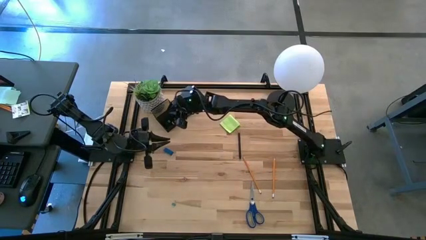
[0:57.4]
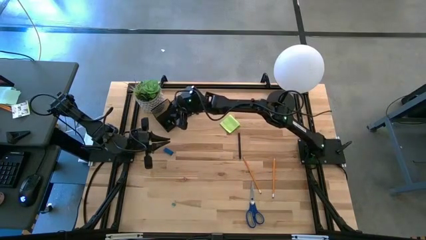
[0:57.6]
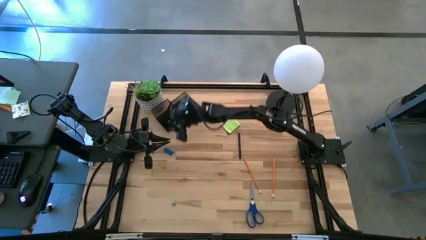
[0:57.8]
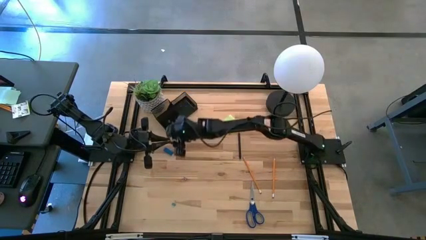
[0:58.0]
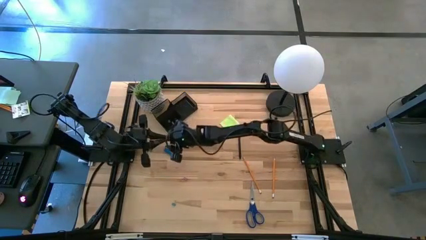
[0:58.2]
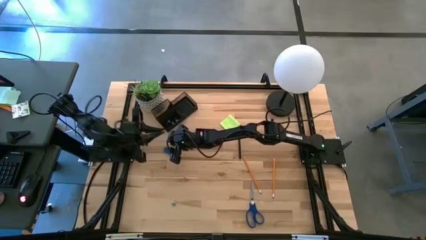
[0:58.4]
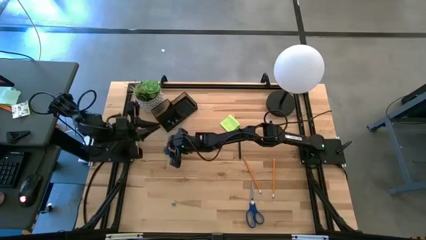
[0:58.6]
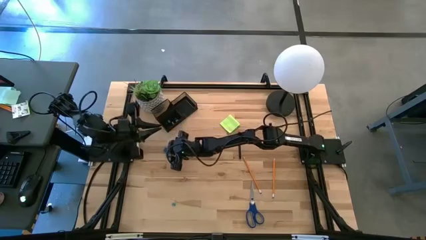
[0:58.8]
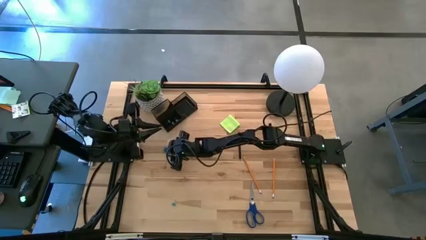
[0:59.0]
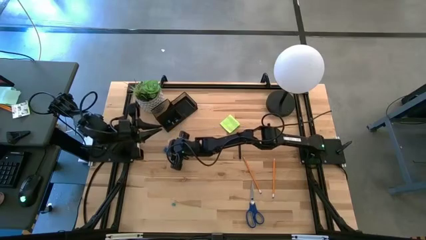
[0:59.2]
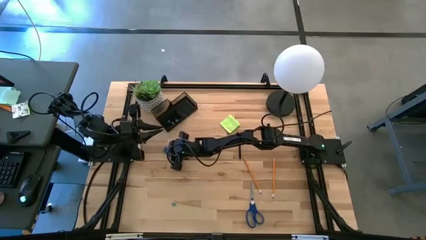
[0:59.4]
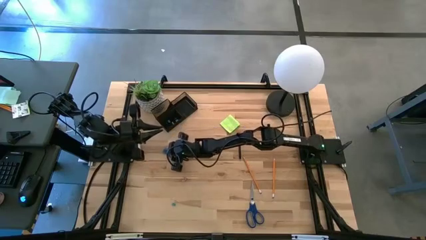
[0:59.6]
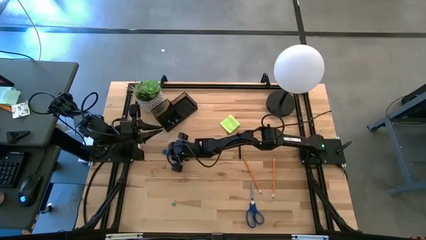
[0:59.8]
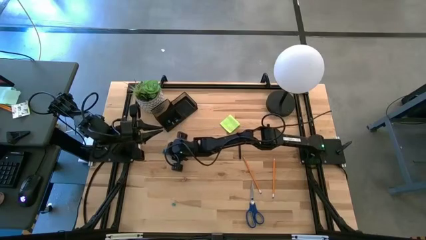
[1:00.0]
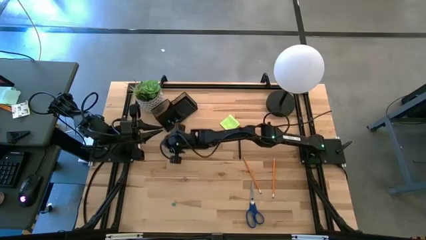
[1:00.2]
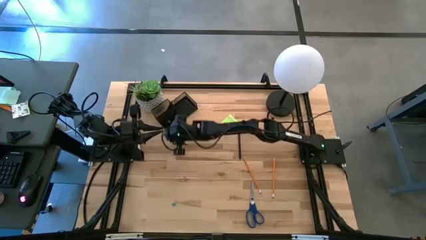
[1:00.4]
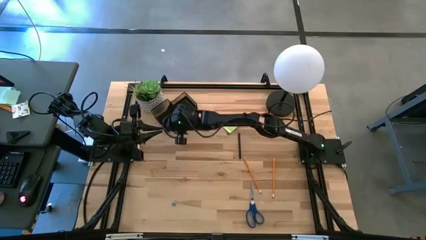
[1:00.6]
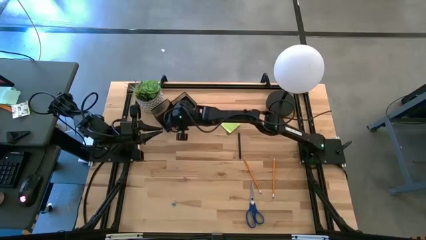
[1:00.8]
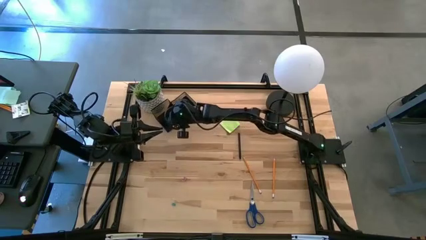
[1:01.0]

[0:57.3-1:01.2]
Task: Pick and place office supplies into organizer
Put the blue eraser into the desk organizer

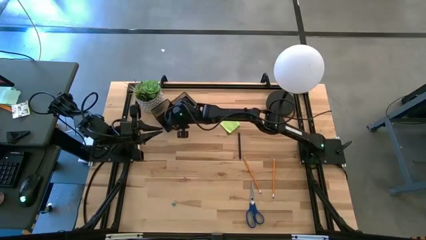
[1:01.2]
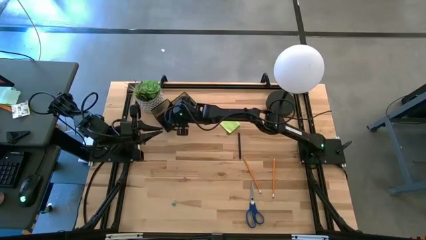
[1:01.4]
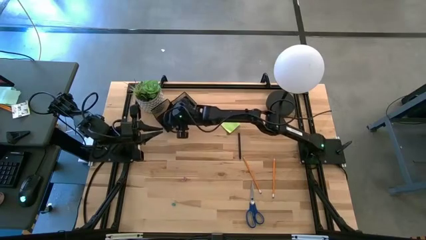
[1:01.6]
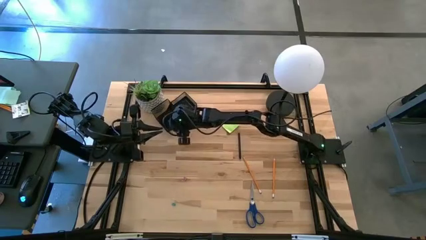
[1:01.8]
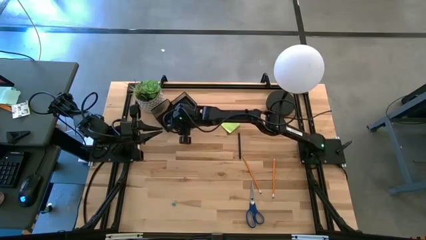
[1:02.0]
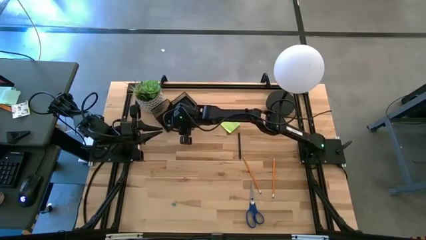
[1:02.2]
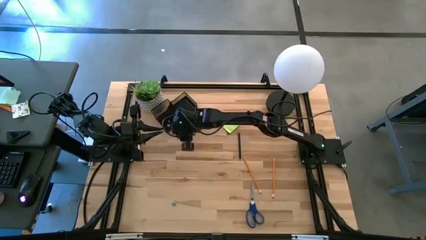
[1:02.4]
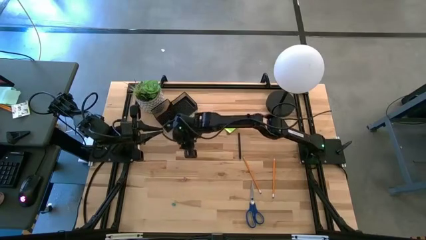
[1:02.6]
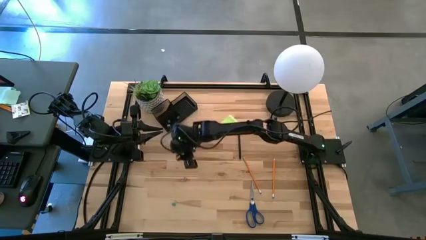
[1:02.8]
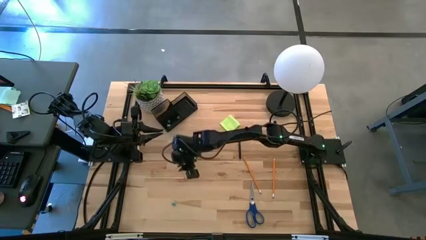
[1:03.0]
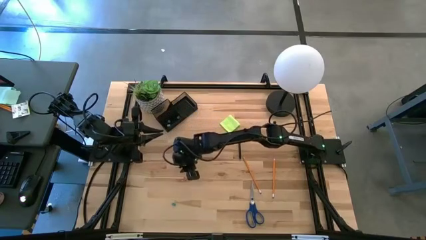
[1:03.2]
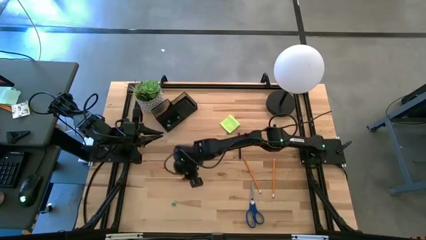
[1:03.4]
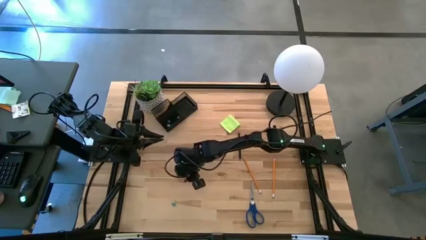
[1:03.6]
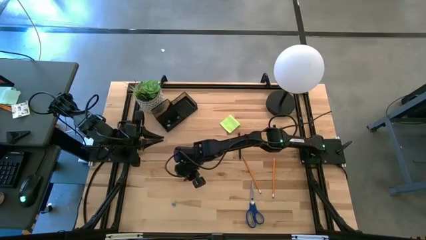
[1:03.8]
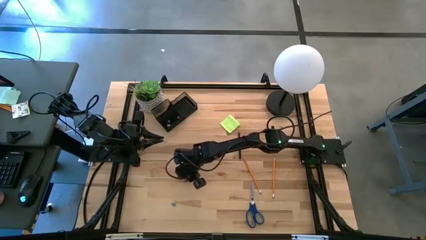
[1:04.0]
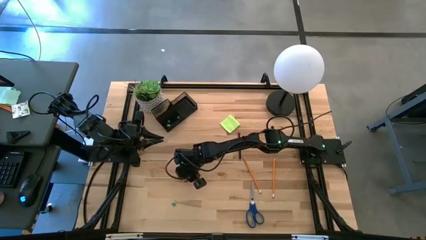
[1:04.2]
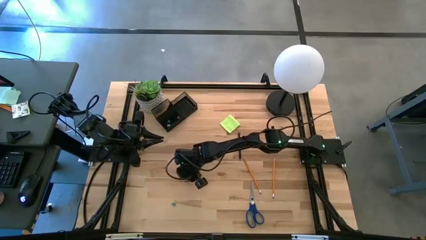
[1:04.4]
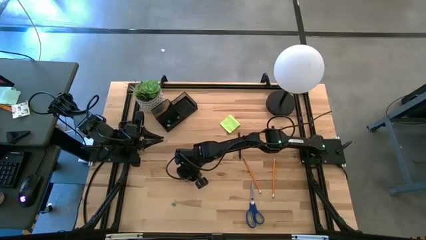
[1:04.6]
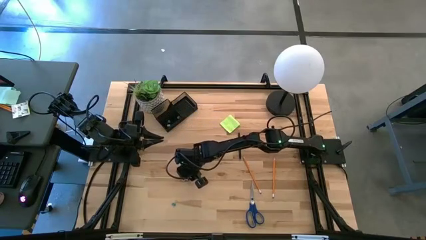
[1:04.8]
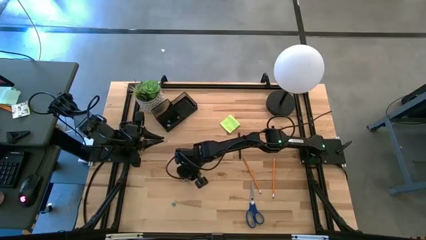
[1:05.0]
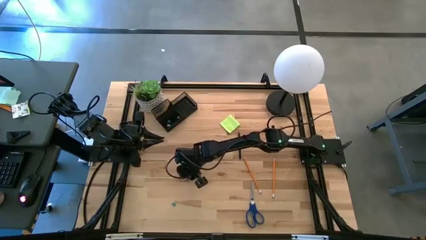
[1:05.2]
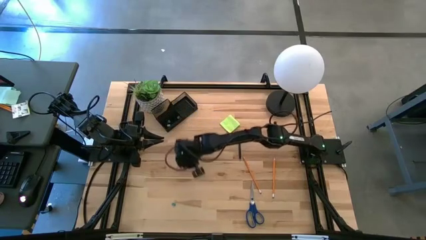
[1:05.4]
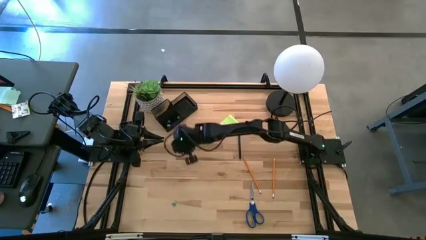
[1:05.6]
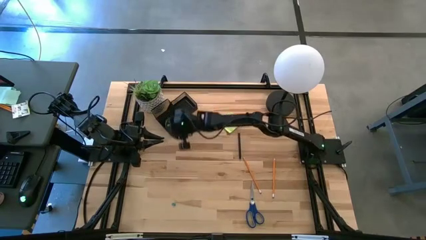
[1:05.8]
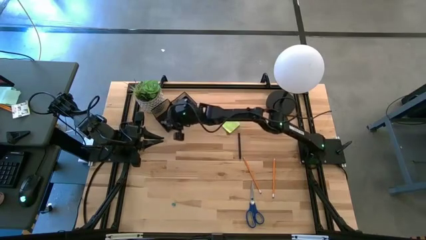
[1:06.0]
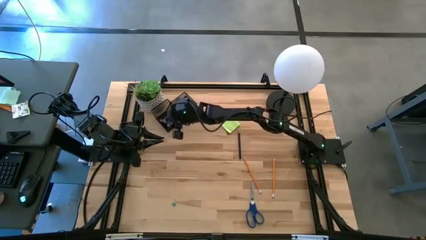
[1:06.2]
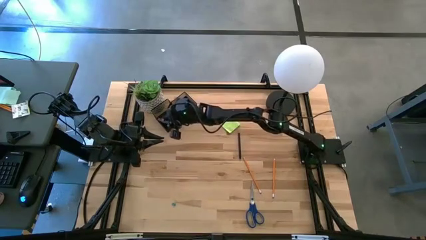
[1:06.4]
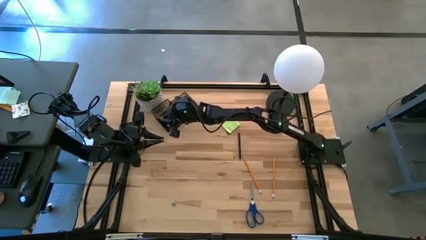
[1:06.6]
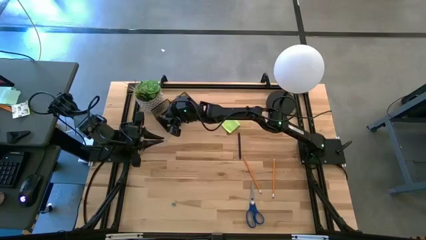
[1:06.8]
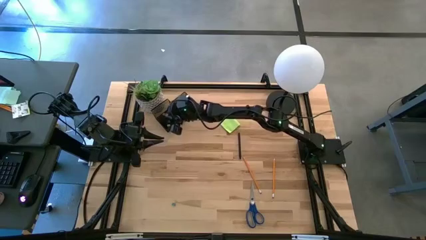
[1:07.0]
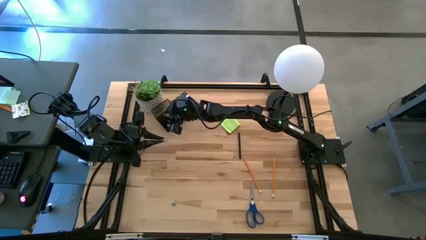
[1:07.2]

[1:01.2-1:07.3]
Put the pink binder clip into the desk organizer

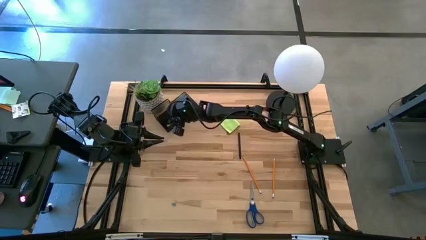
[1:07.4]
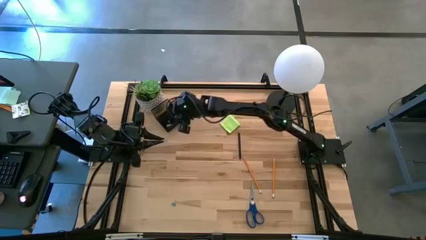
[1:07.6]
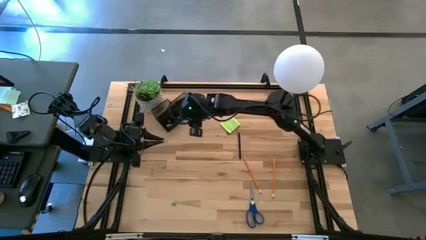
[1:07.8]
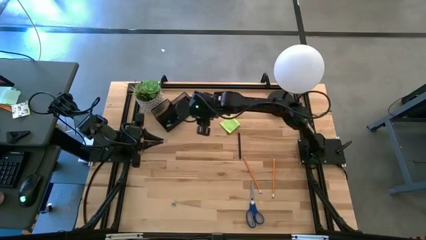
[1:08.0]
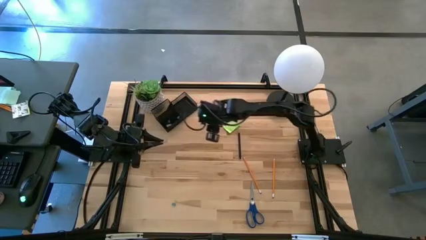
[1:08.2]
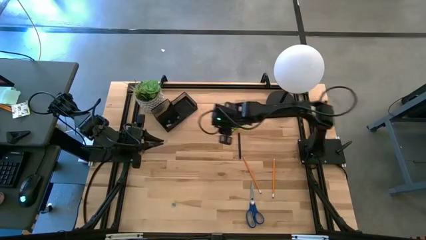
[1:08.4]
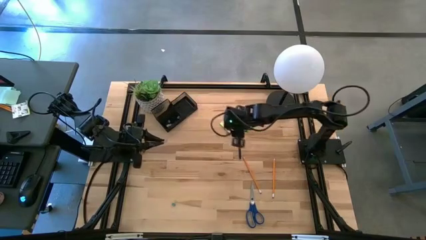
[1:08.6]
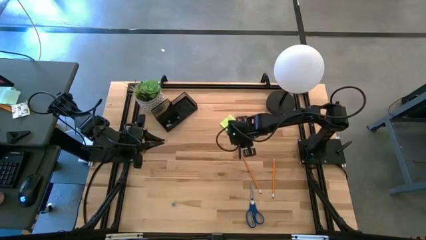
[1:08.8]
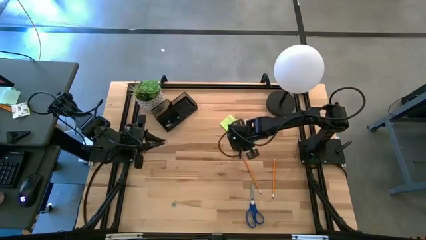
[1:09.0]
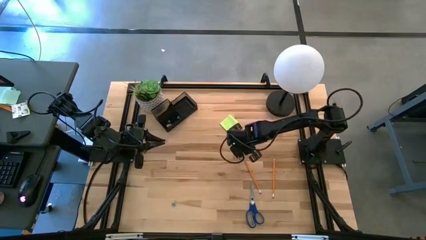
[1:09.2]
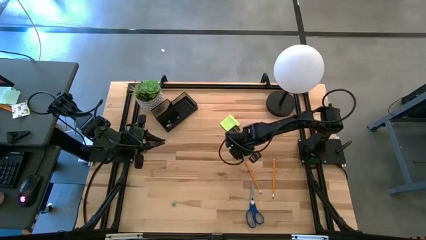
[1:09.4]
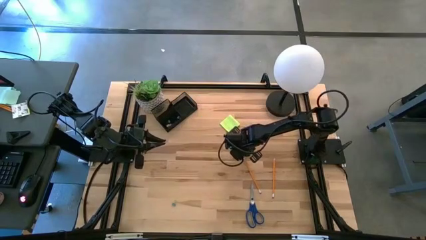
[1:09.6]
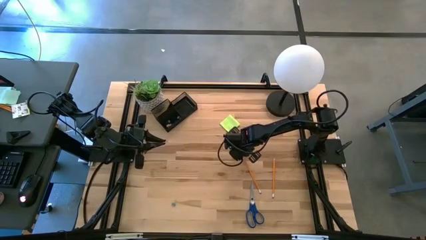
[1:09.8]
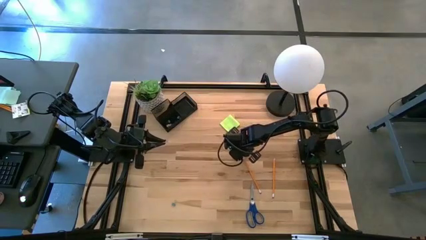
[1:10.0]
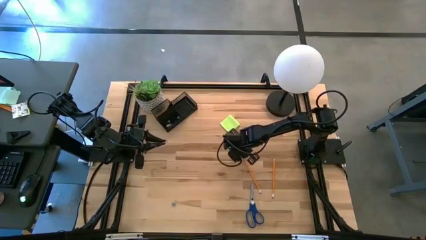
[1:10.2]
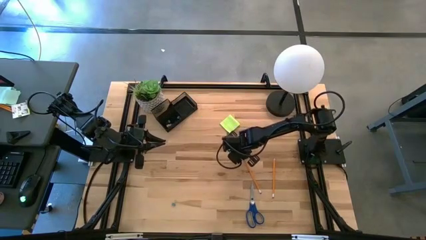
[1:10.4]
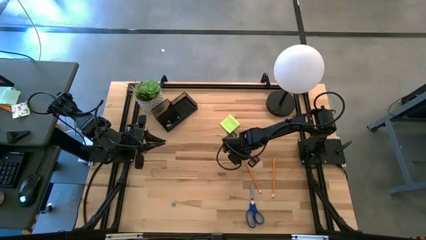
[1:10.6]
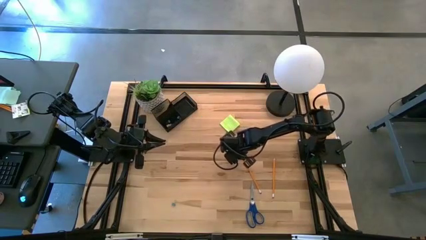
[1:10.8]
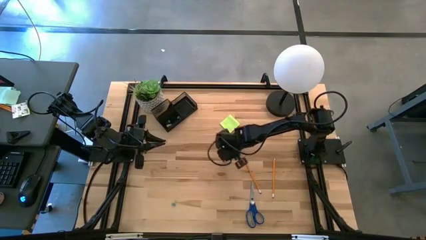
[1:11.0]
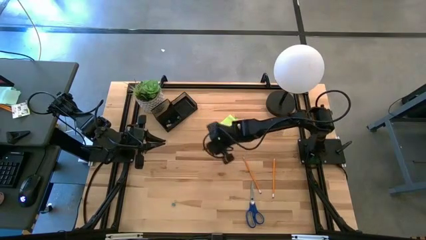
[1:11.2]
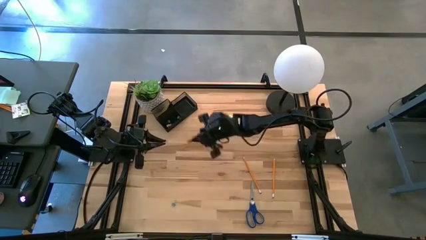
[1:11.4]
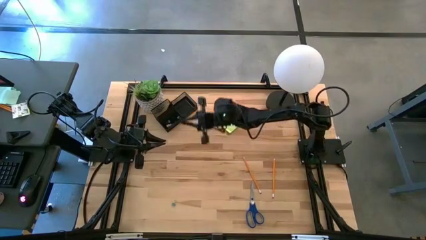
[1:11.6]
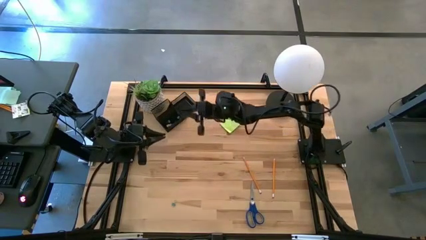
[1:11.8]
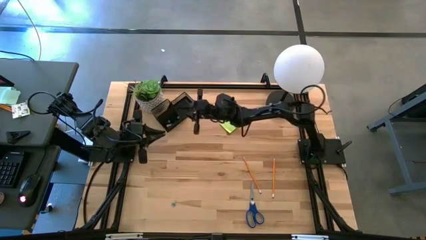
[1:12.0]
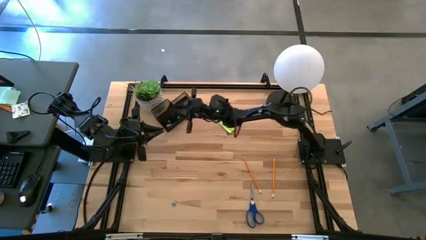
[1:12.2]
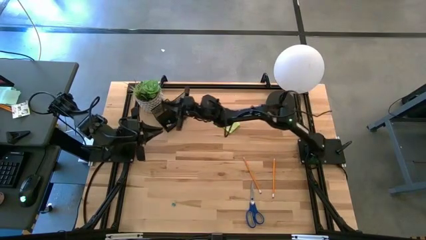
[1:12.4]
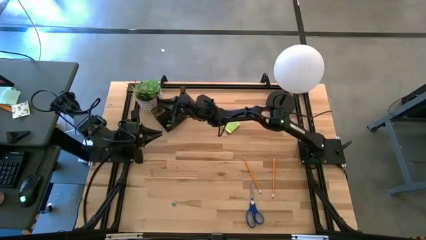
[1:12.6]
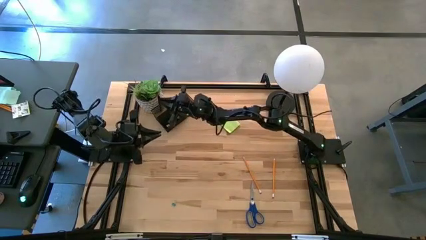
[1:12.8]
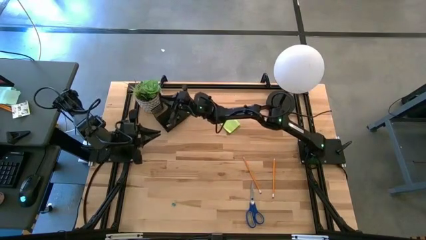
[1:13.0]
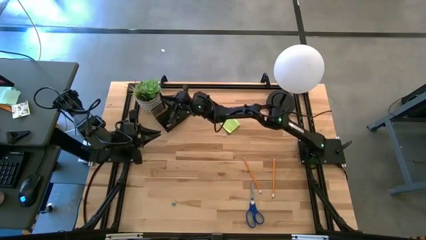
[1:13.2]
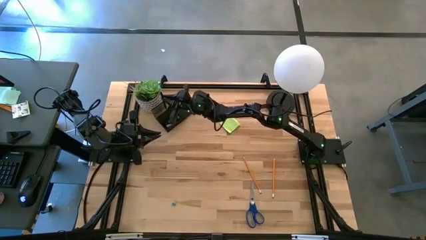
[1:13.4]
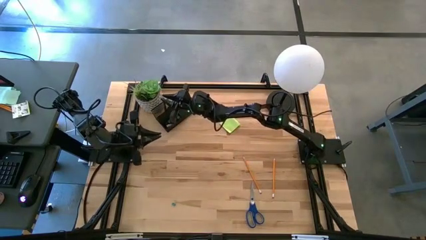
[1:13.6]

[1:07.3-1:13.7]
Put the black pen into the desk organizer
